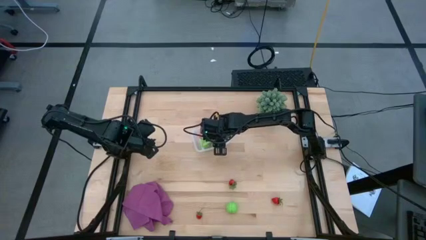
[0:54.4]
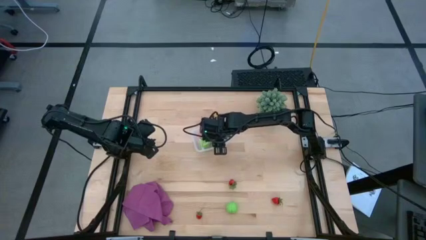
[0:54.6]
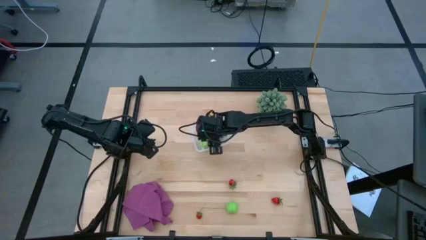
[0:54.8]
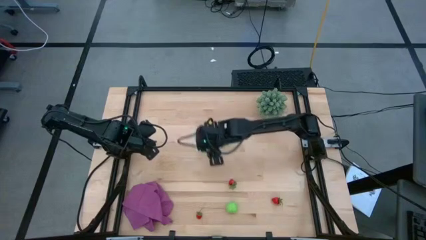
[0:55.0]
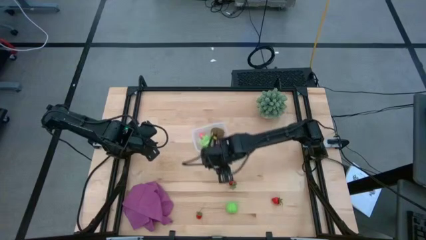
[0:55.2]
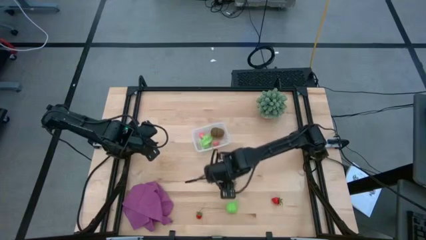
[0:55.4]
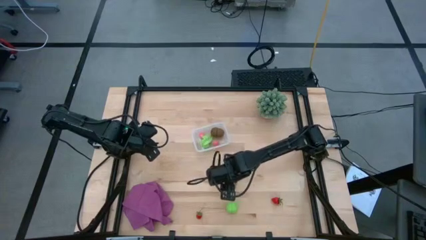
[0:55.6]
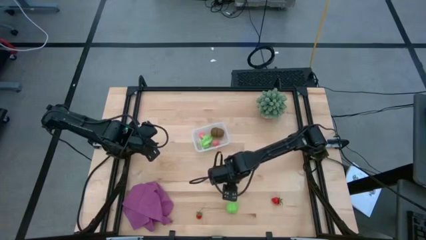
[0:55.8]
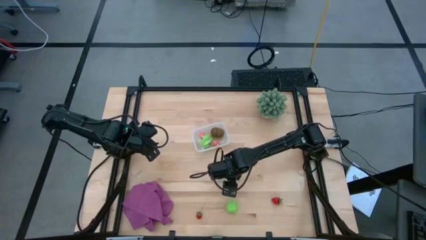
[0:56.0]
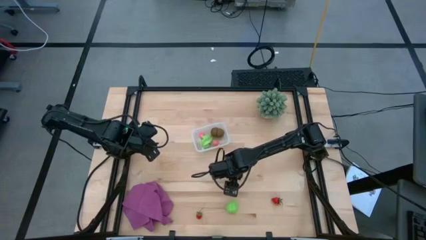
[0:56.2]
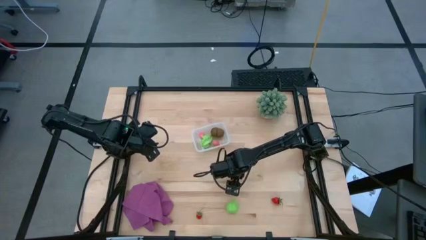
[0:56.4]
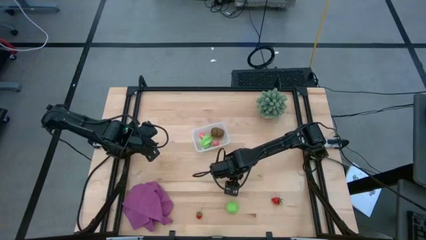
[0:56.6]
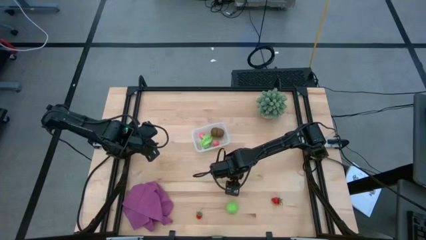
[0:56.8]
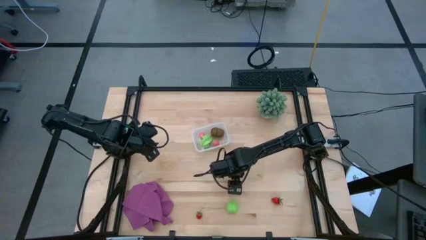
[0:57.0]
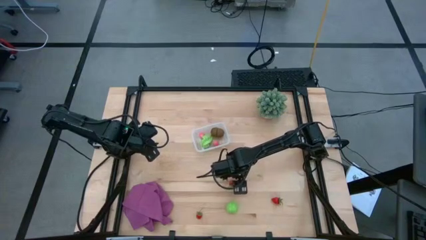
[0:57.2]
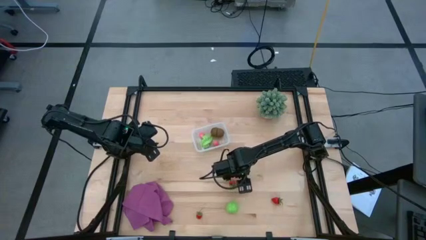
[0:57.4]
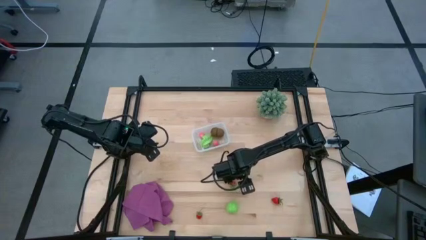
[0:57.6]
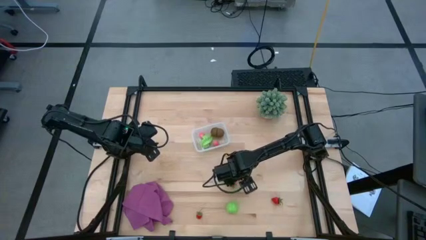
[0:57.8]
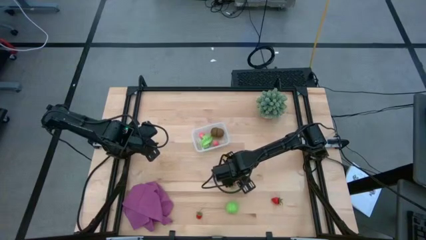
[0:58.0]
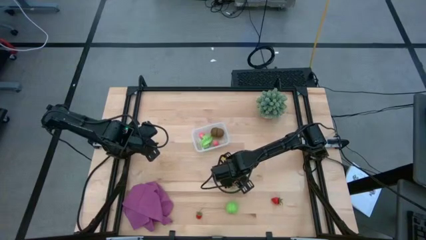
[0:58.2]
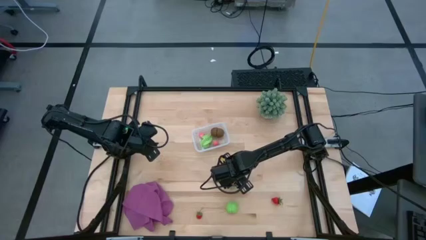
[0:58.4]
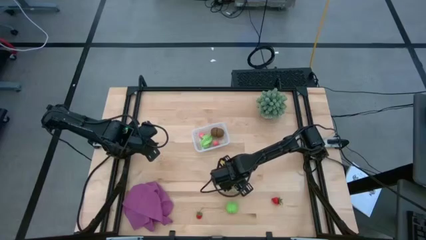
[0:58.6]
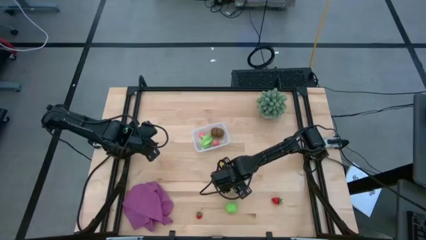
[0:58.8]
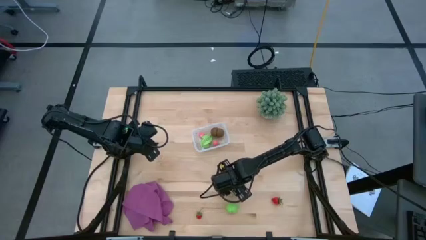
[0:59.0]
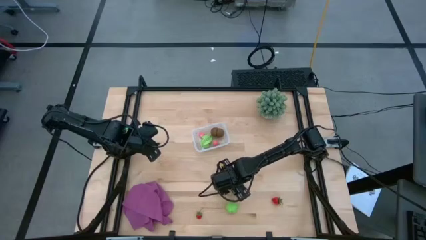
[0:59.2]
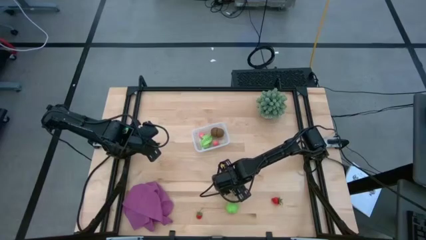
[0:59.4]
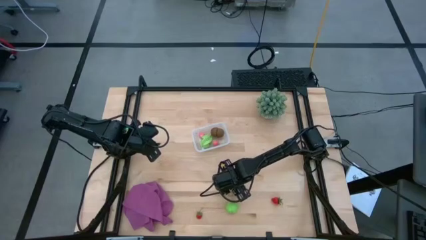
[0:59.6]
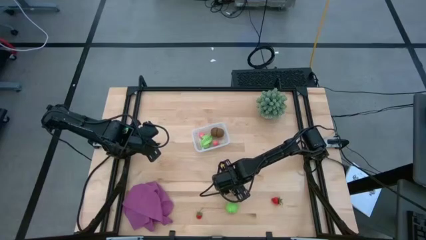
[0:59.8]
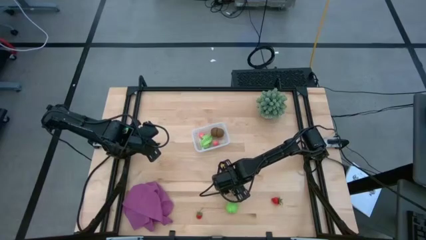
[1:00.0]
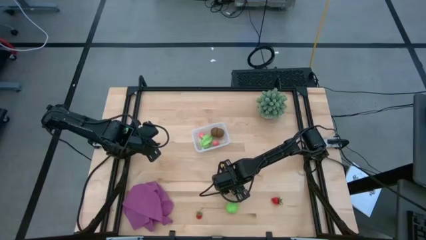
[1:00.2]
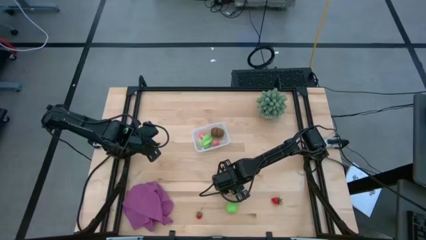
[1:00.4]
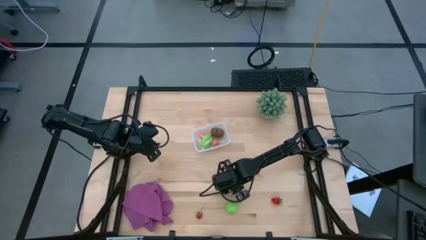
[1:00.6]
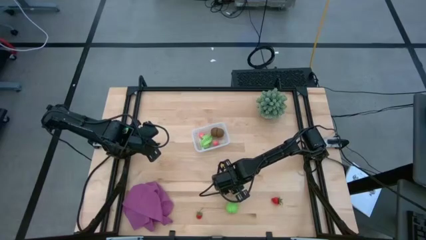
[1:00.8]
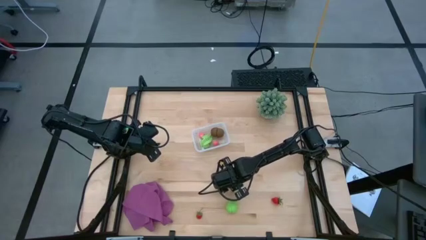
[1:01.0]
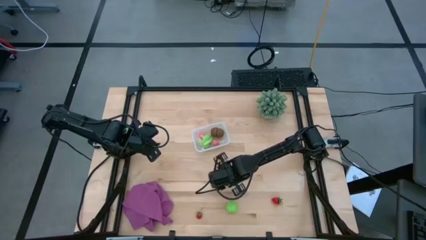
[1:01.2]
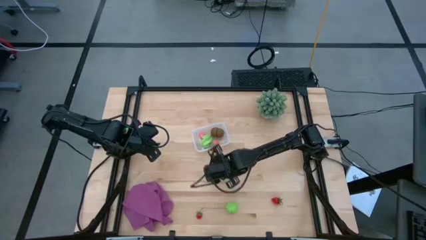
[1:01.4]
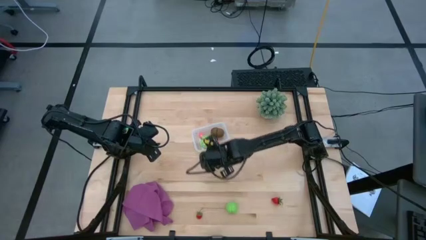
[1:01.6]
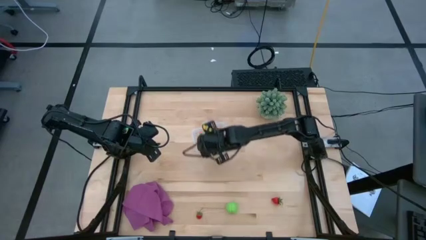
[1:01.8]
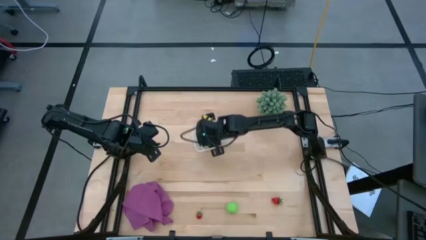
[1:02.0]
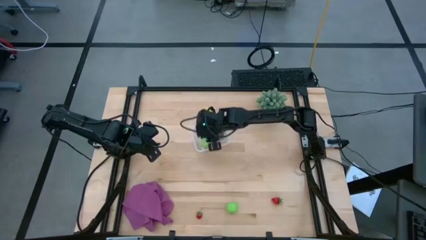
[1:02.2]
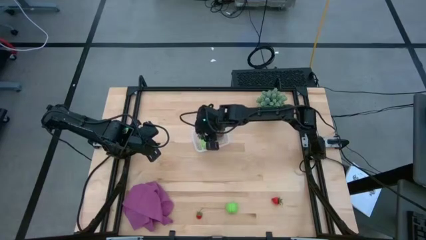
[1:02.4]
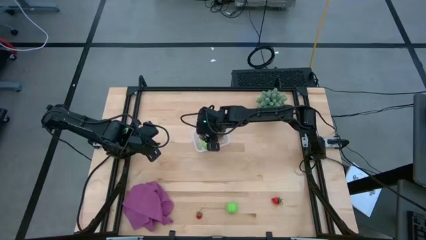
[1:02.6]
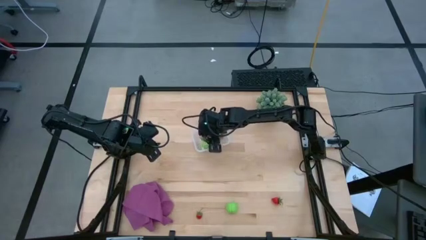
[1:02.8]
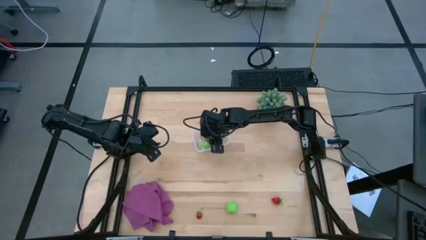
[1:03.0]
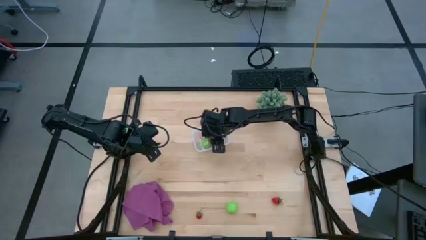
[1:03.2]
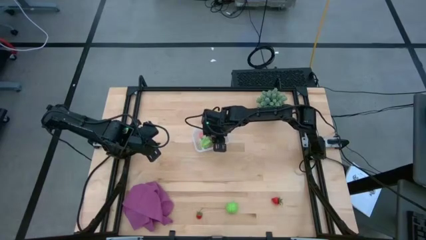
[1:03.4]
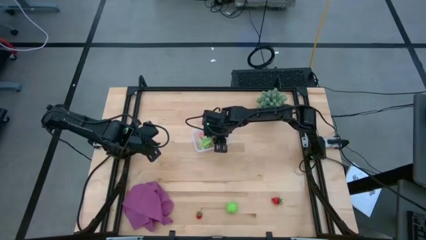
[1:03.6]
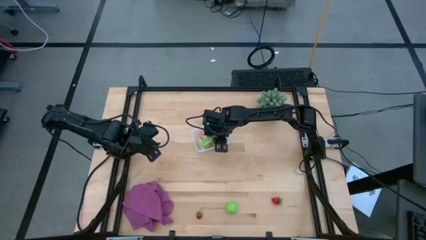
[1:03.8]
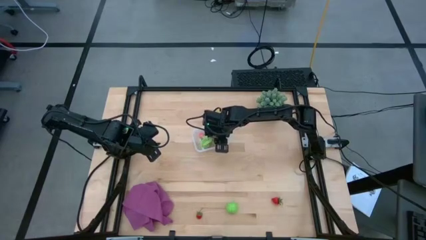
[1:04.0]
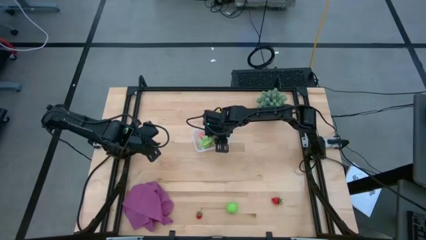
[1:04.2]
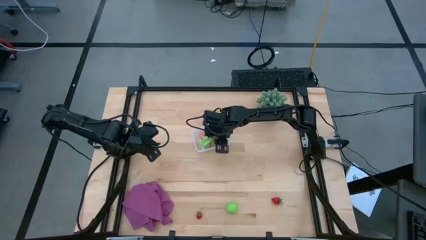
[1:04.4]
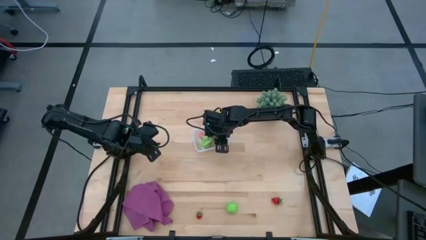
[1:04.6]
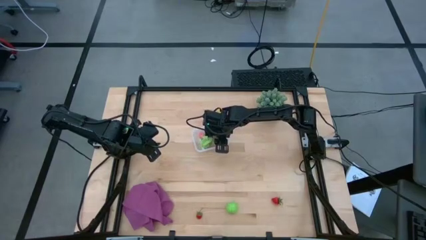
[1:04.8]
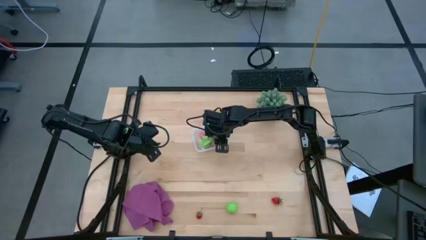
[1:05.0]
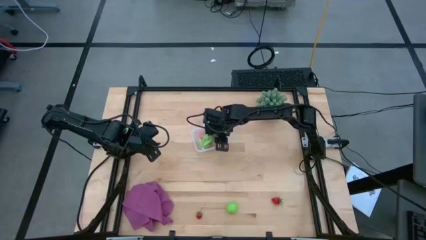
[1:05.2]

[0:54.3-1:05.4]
Task: Pick and placing Produce into tupperware
Put the top red strawberry into the transparent container

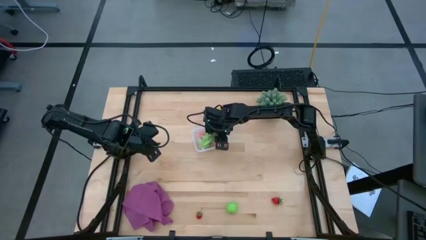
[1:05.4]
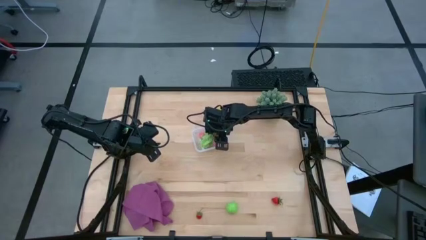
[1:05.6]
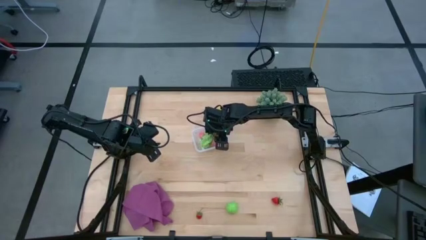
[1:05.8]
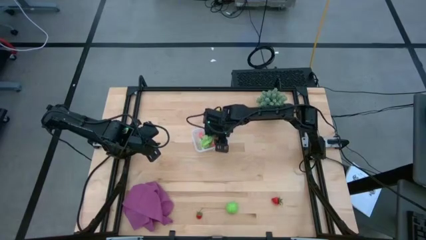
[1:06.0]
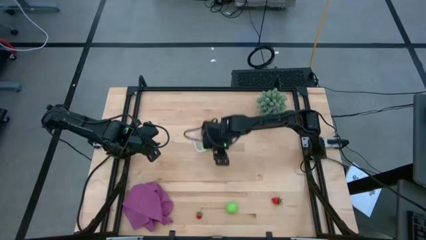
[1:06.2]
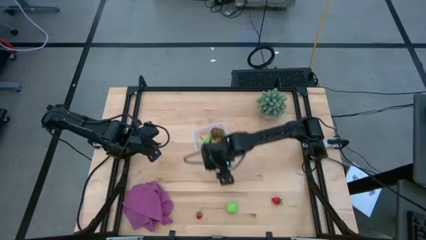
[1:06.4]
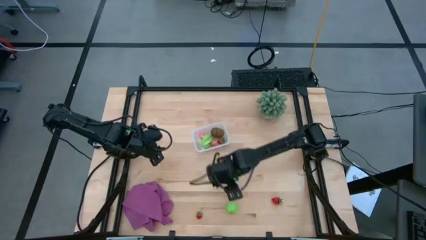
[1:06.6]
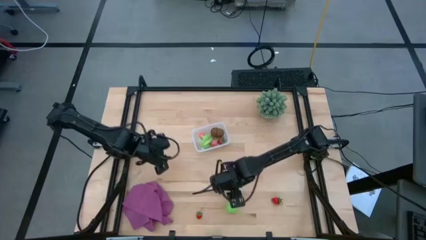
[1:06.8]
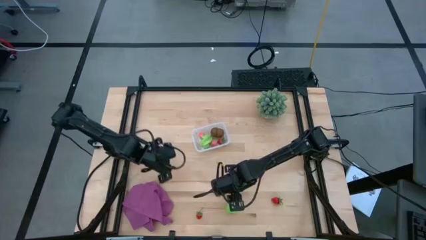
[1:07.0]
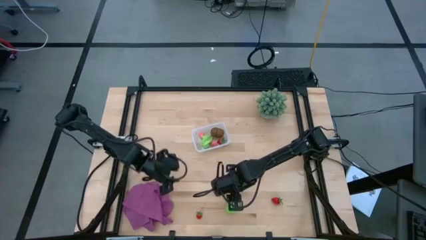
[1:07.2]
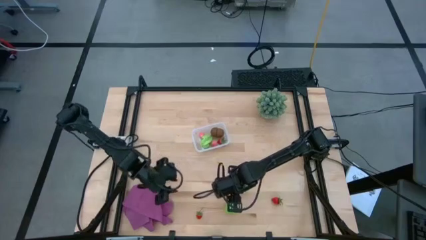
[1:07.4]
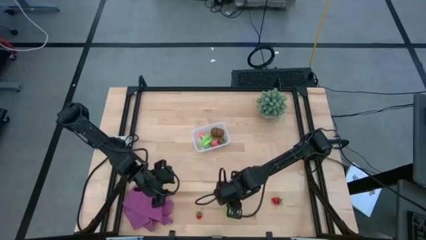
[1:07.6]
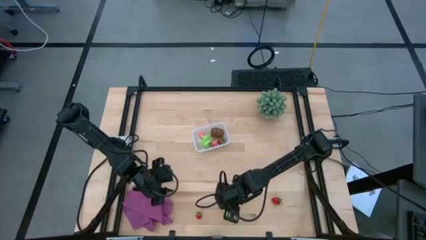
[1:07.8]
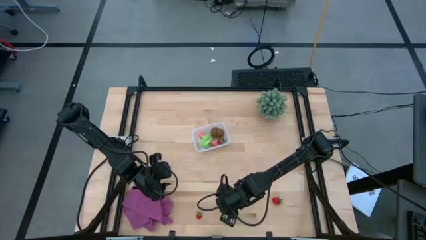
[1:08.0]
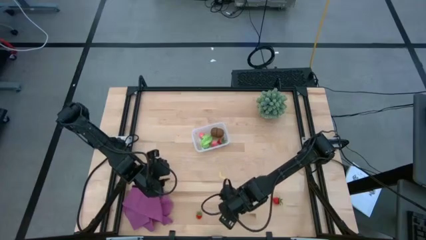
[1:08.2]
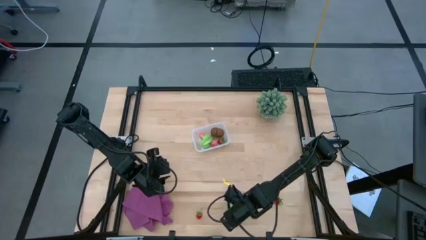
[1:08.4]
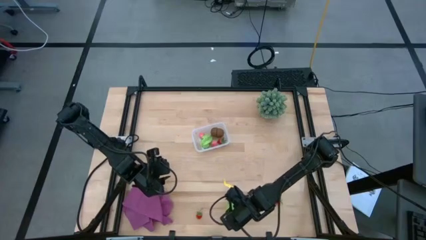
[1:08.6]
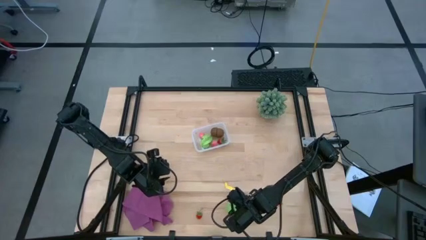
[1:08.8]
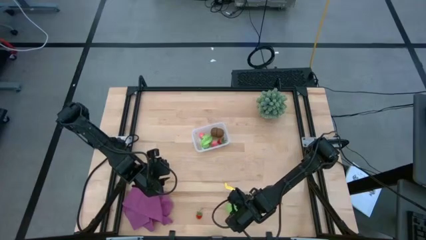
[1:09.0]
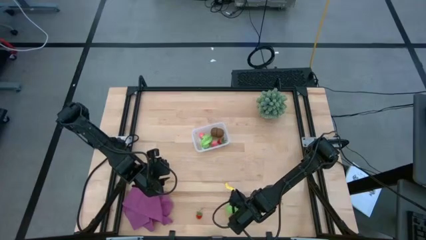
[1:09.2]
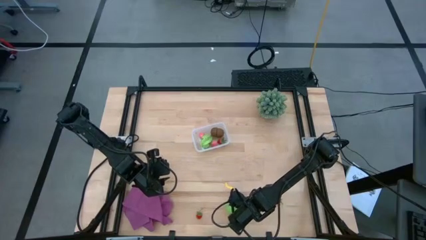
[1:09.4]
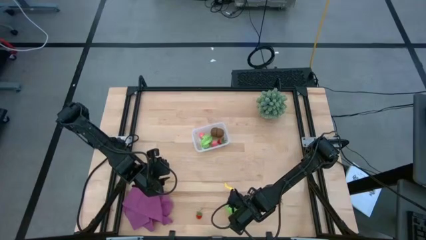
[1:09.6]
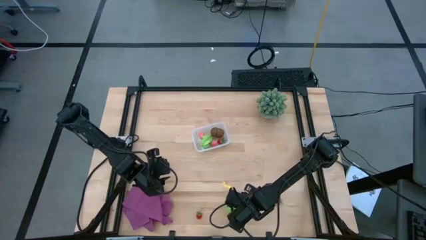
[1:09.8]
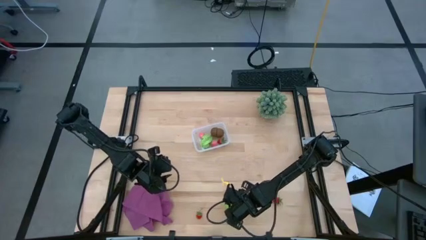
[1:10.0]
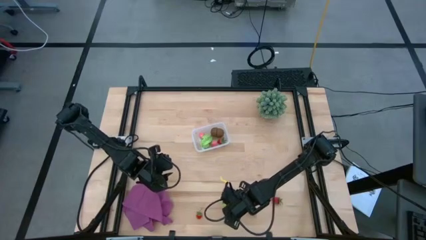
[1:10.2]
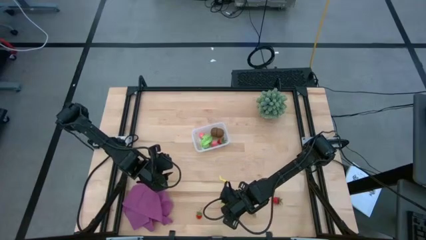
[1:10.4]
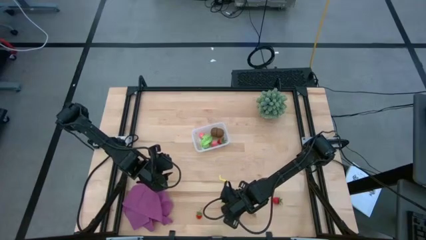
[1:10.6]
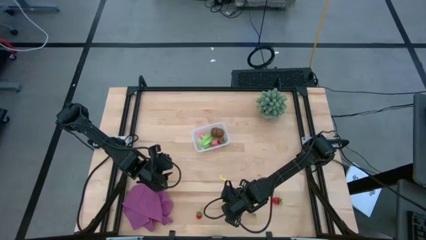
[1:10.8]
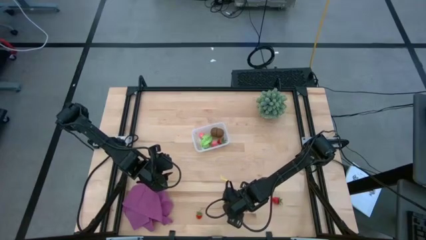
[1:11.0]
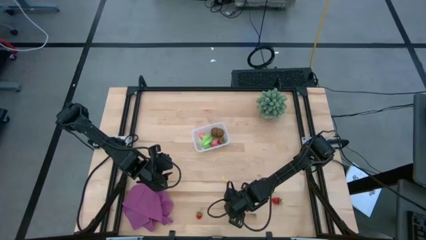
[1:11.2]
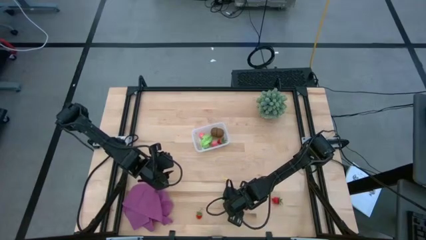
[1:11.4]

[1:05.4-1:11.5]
Put the green cabbage into the transparent container
